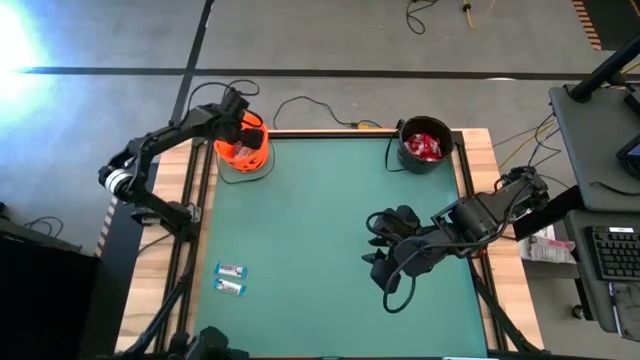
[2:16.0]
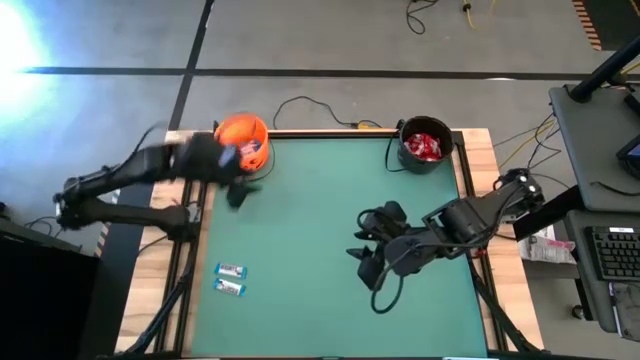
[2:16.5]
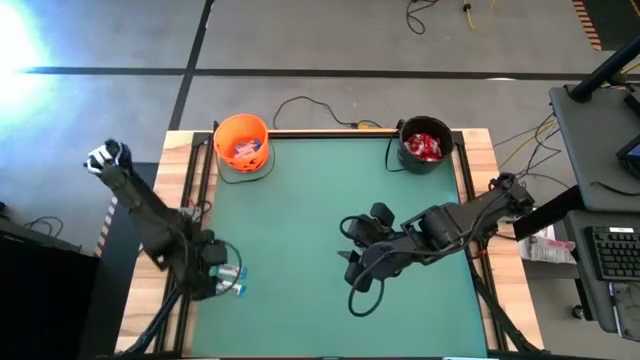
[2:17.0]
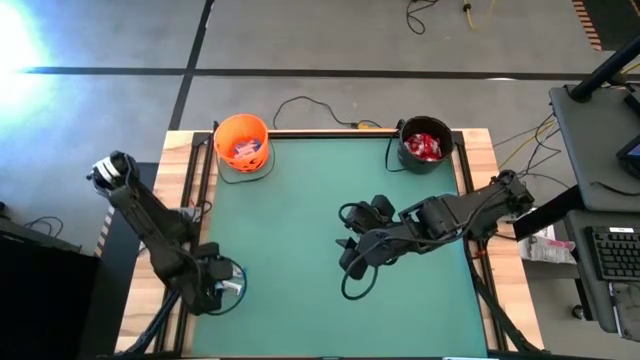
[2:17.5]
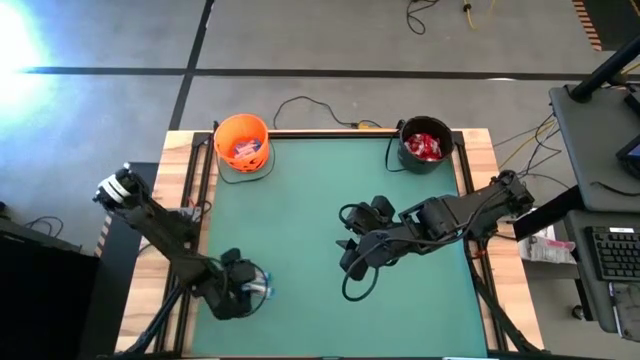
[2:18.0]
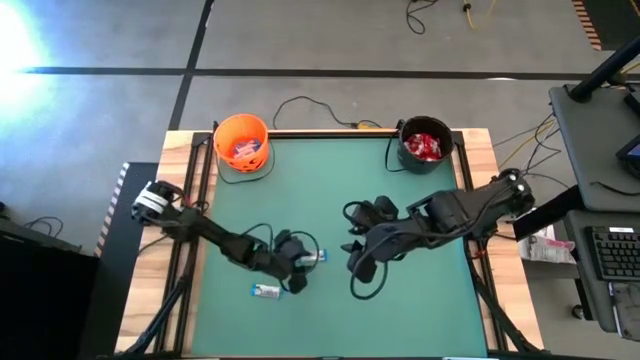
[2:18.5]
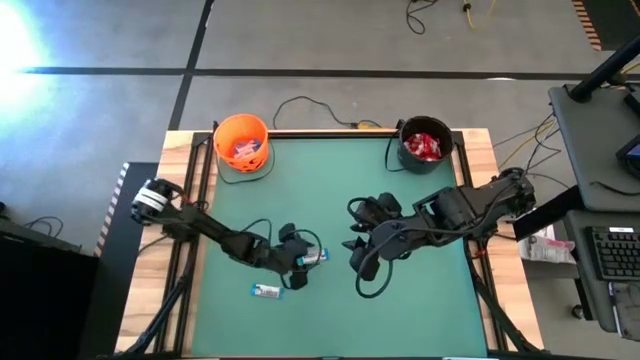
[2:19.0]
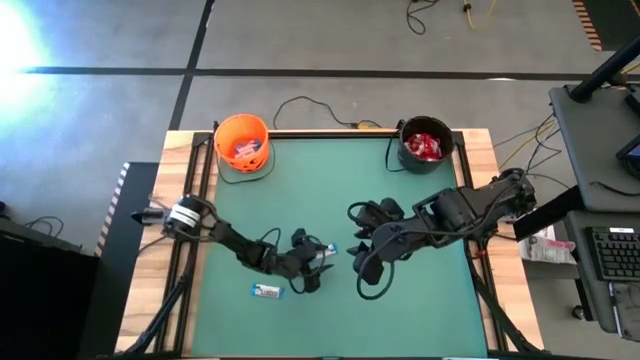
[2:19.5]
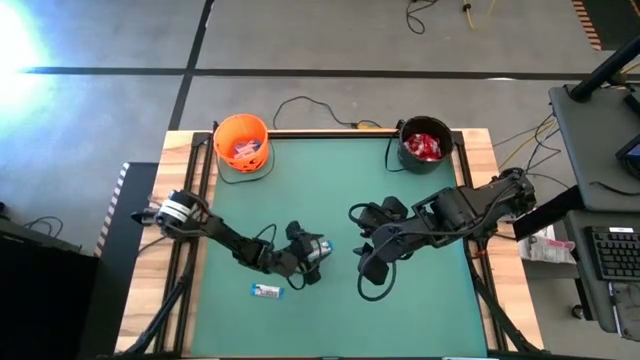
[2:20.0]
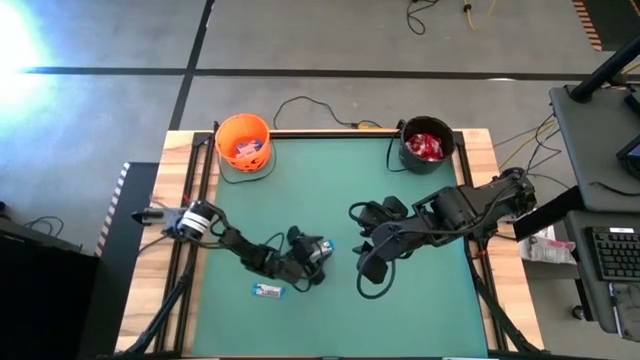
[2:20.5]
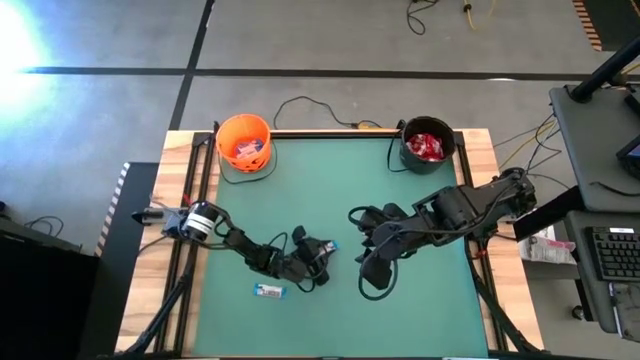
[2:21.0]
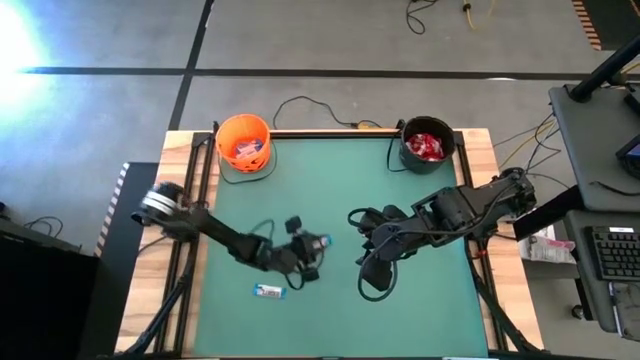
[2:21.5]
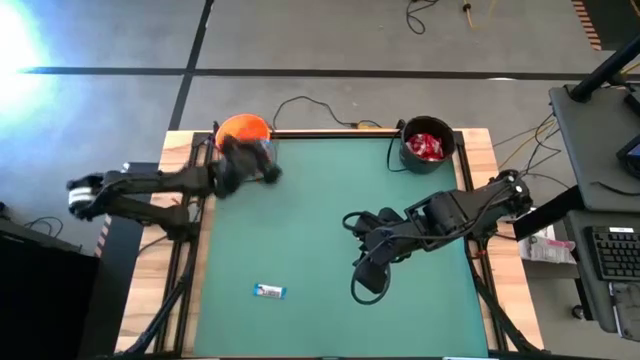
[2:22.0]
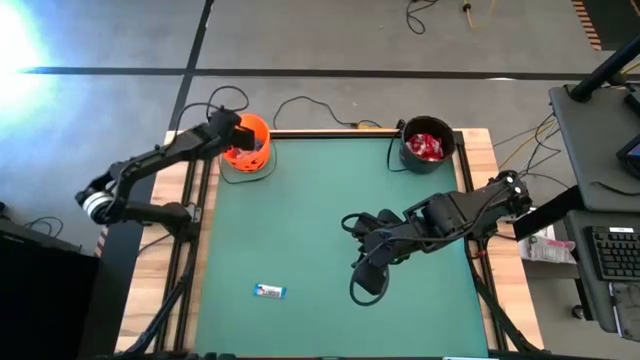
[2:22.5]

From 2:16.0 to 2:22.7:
Task: Sort candy by brand, put in halloween buckets
Put the white chocolate into the orange bucket

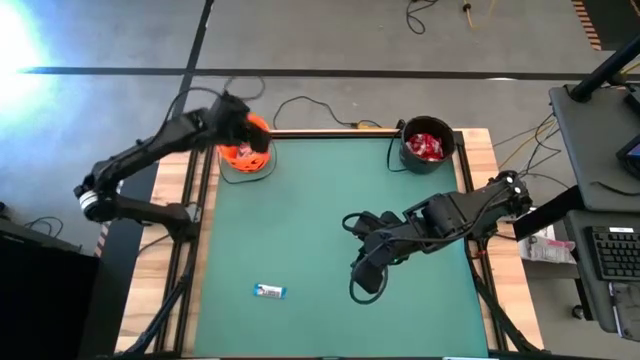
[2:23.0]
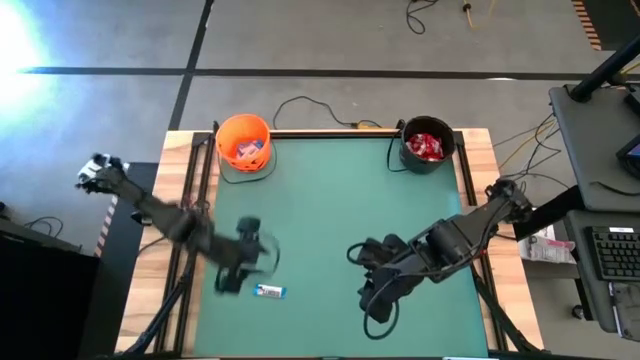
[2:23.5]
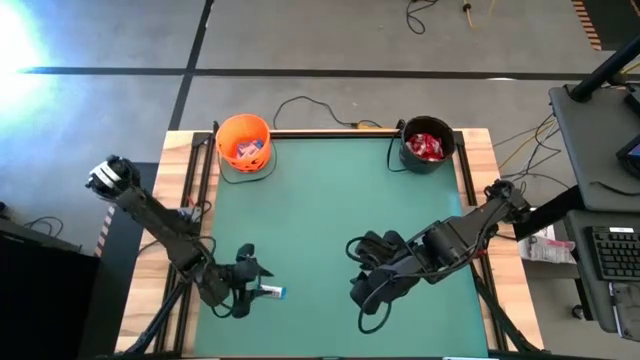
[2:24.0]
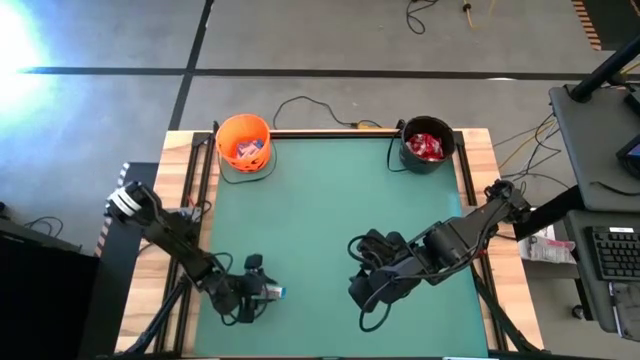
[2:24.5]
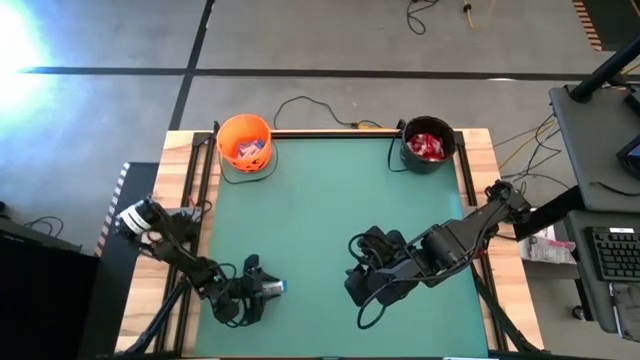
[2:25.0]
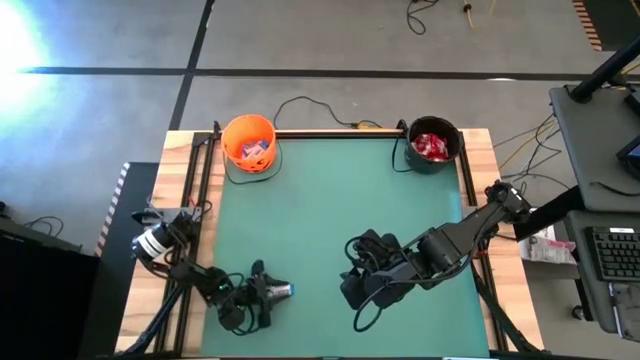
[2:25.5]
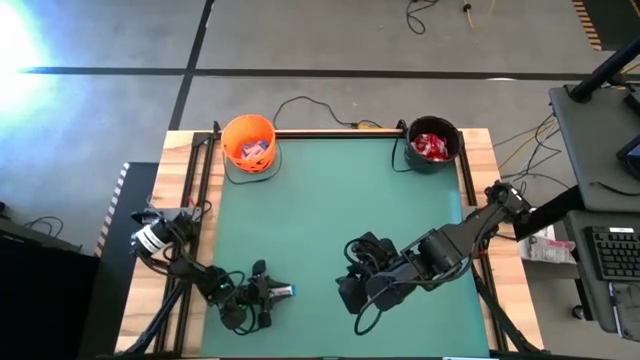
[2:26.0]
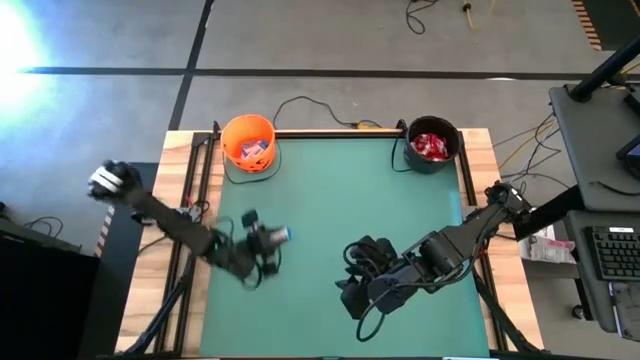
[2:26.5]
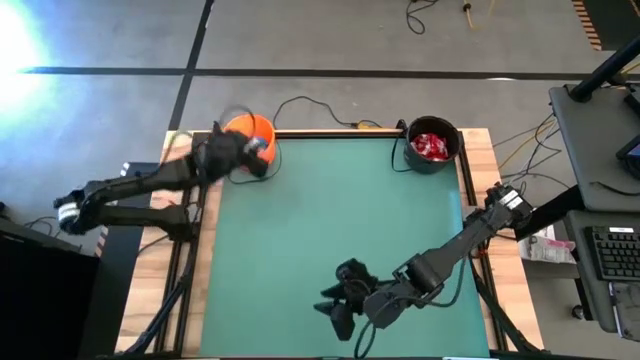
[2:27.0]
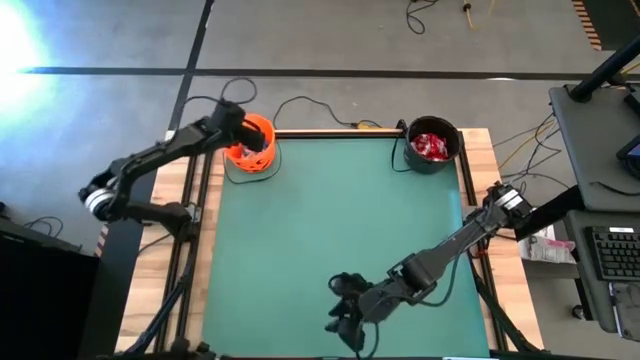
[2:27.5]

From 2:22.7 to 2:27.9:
Put the white chocolate into the orange bucket

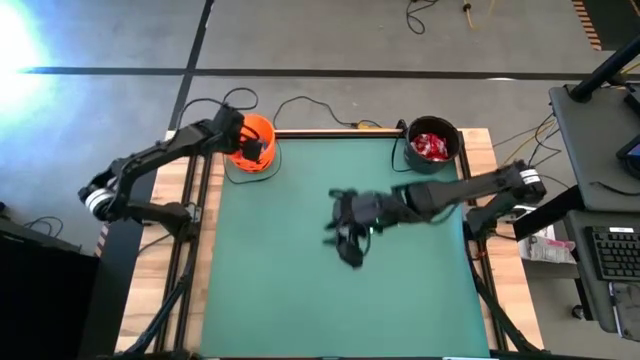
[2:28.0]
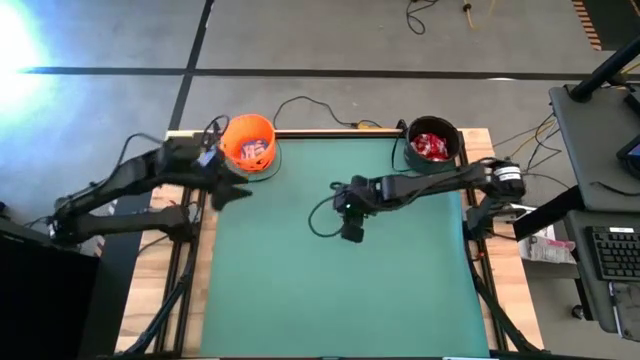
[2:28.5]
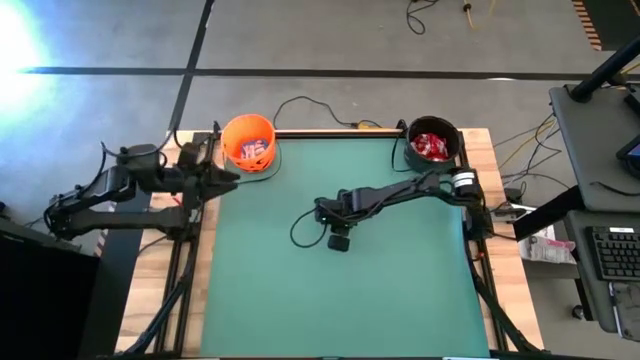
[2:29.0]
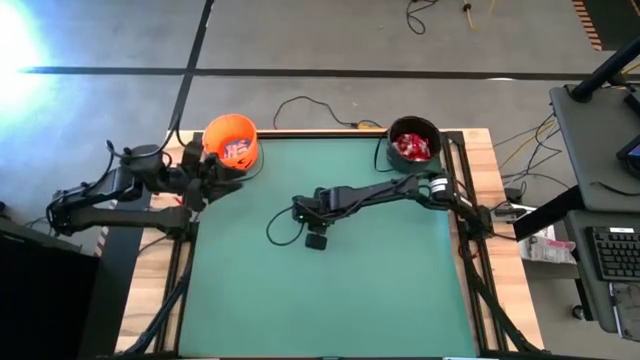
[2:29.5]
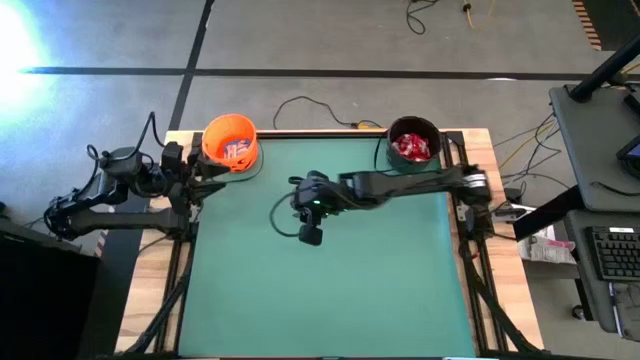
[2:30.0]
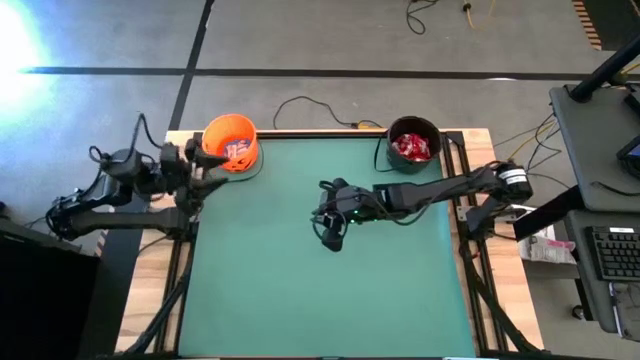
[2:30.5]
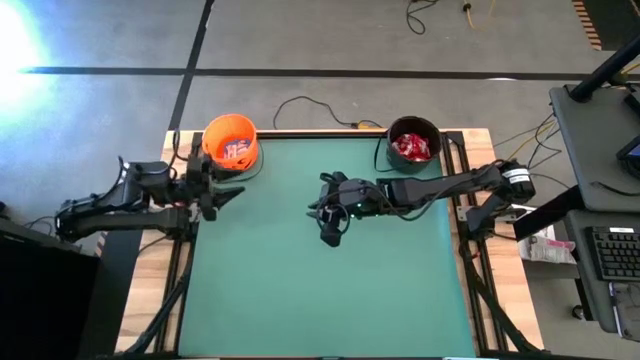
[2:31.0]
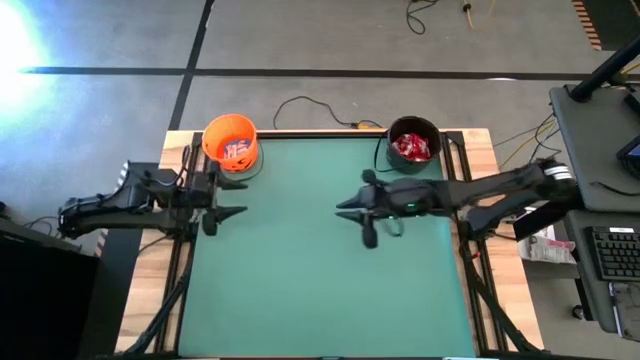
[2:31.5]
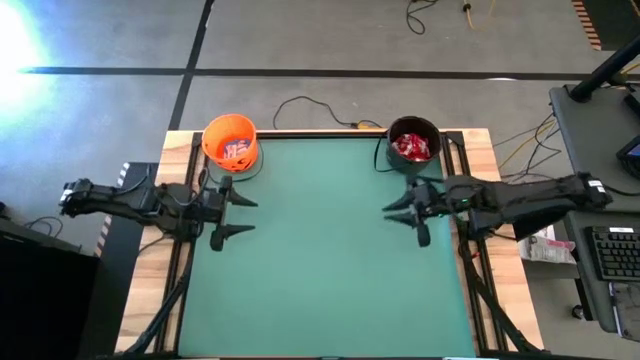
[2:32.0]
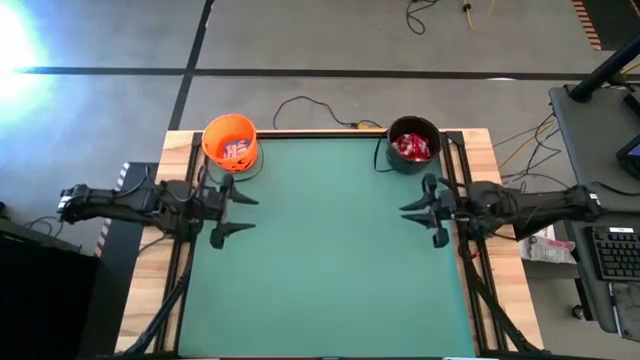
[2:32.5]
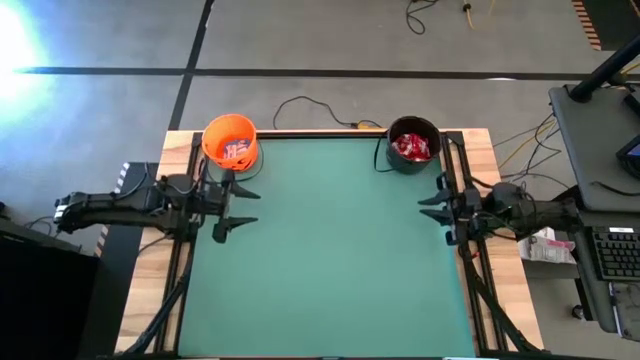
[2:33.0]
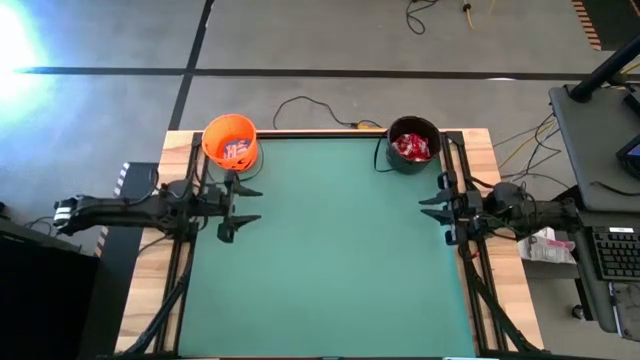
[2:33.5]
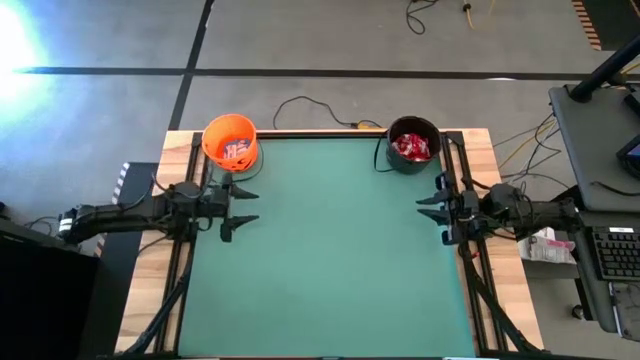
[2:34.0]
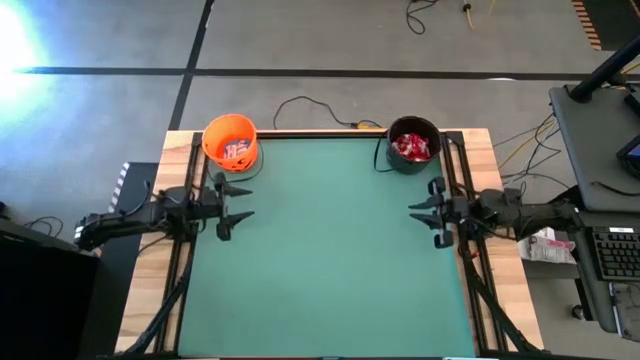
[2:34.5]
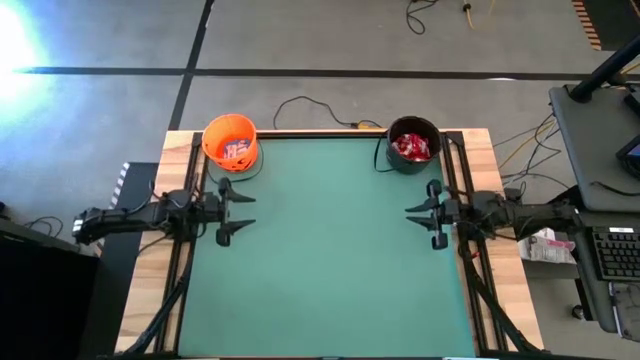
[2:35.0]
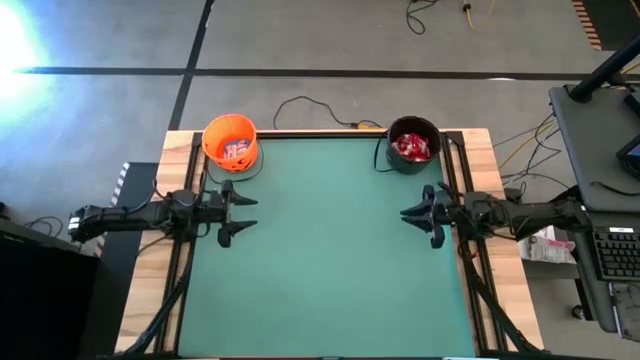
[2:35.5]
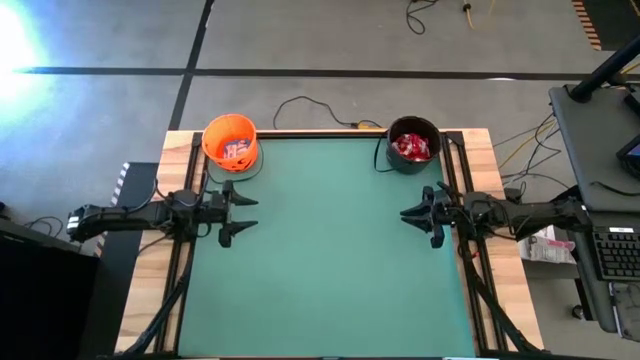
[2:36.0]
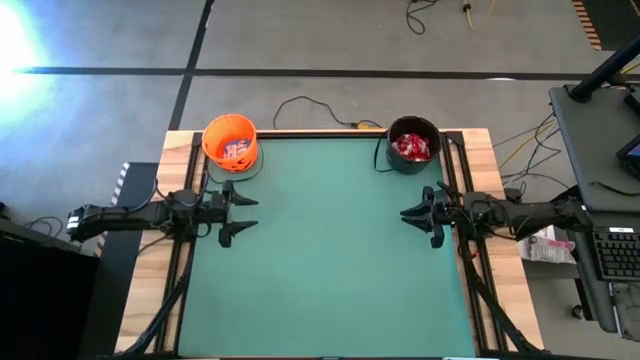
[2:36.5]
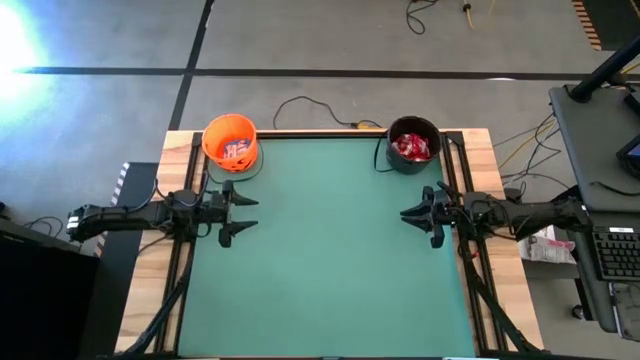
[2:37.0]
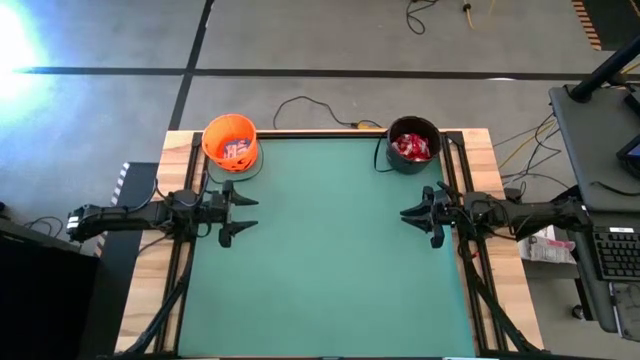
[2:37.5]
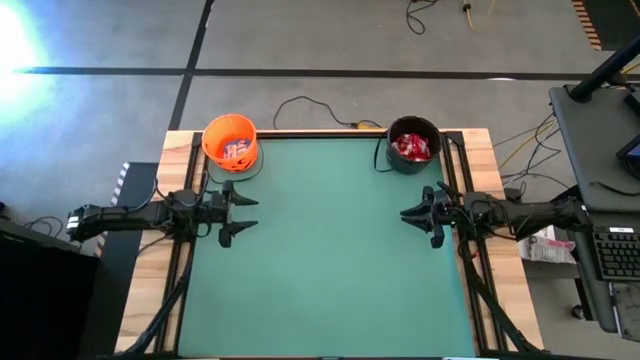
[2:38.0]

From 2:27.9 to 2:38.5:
Return to Home Position
